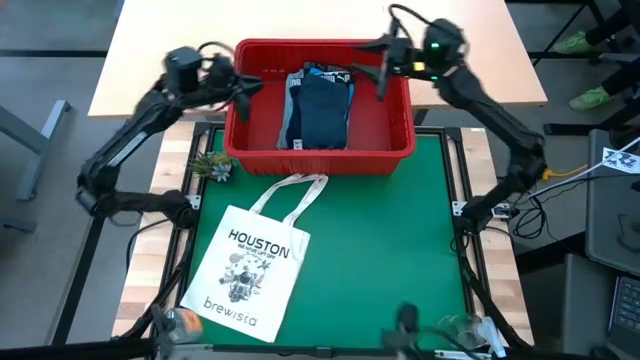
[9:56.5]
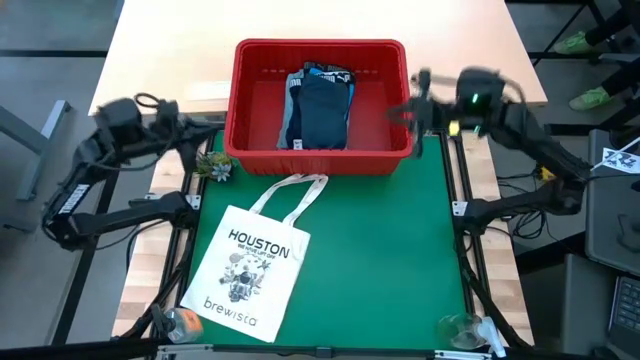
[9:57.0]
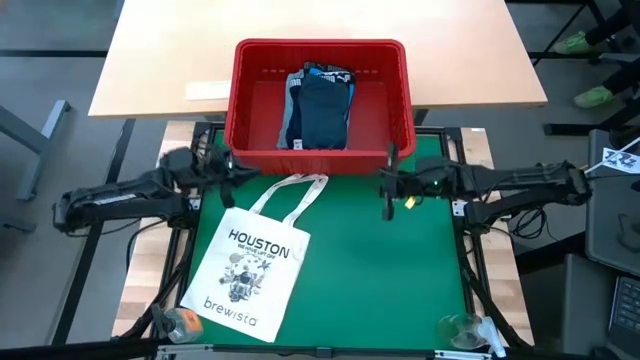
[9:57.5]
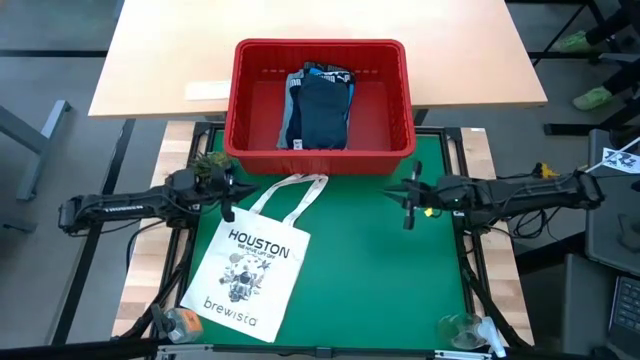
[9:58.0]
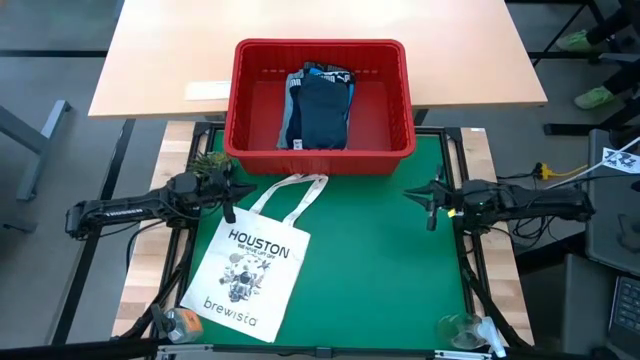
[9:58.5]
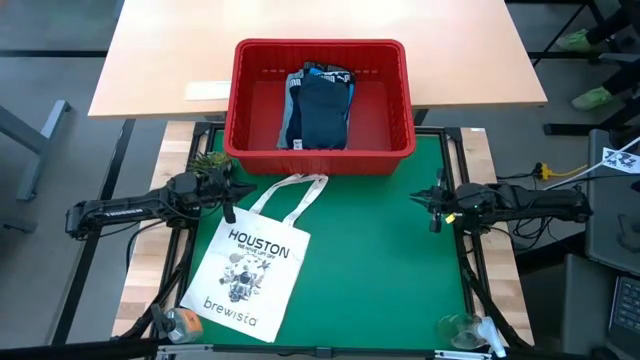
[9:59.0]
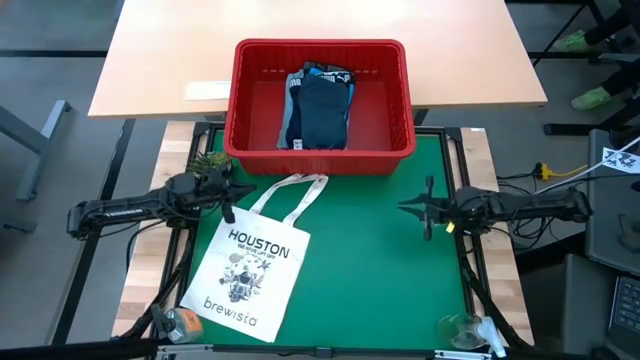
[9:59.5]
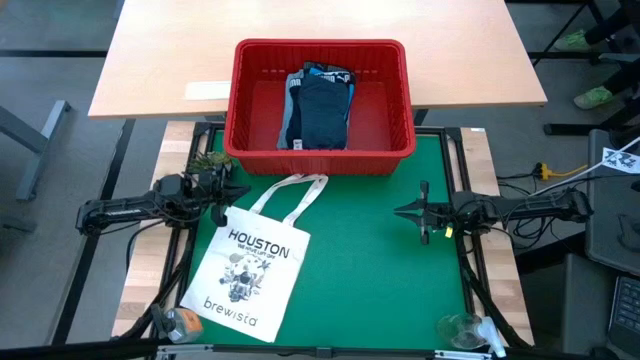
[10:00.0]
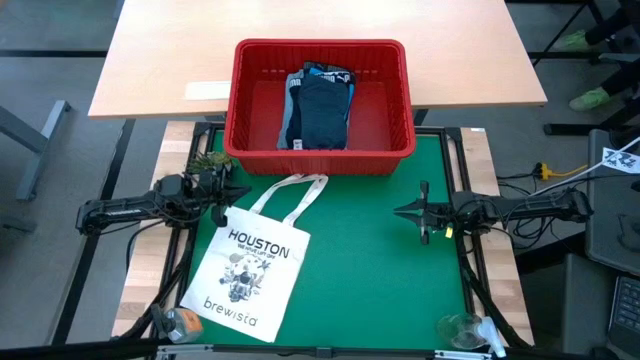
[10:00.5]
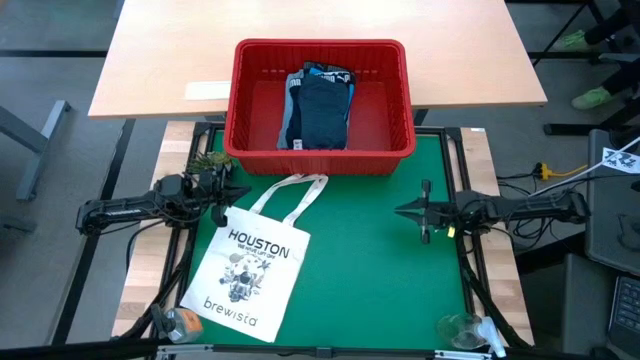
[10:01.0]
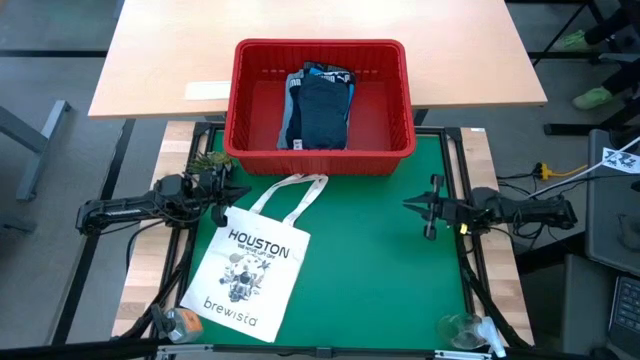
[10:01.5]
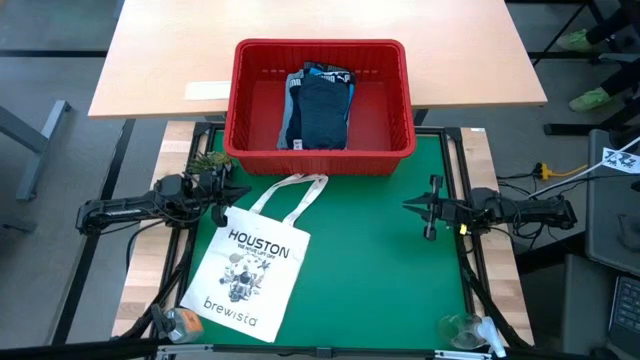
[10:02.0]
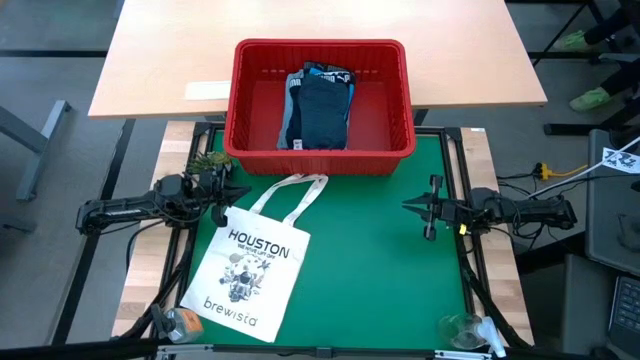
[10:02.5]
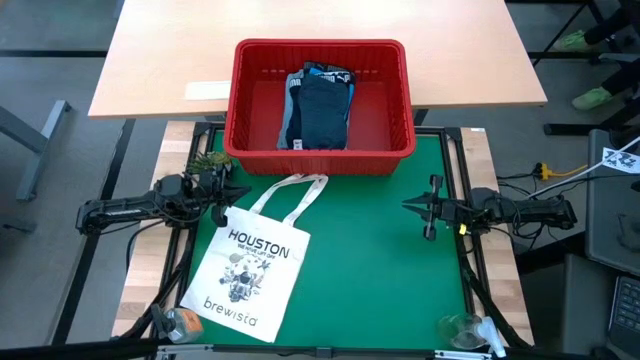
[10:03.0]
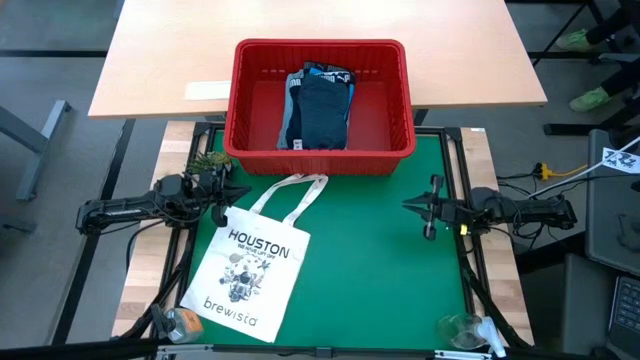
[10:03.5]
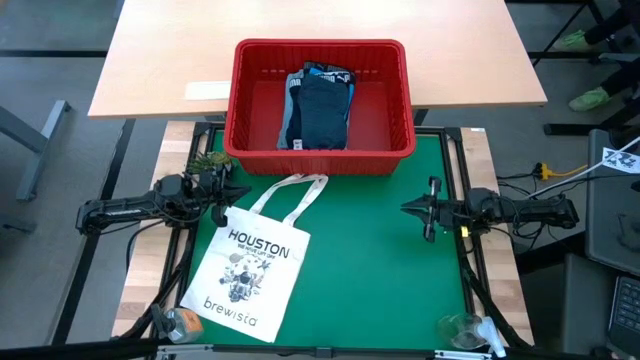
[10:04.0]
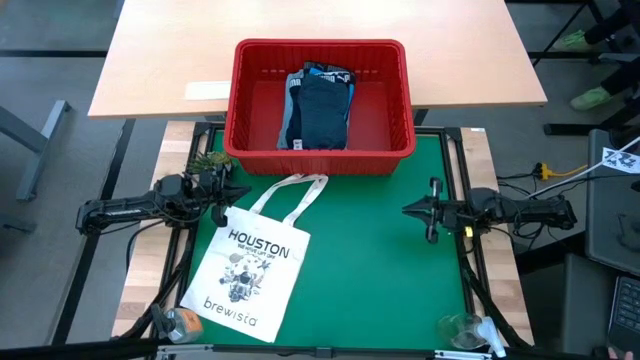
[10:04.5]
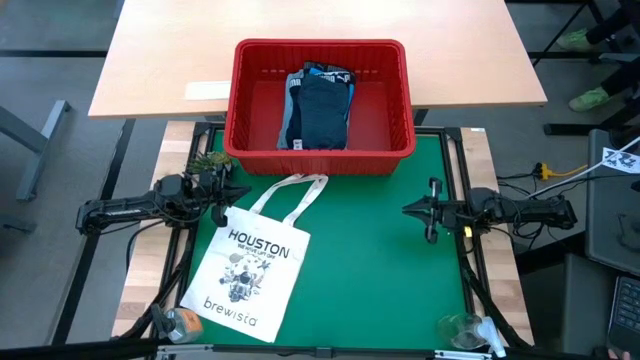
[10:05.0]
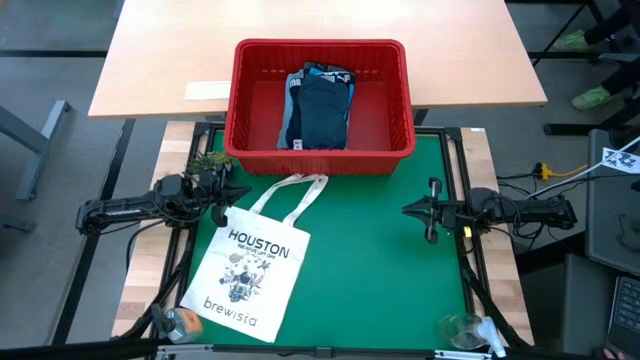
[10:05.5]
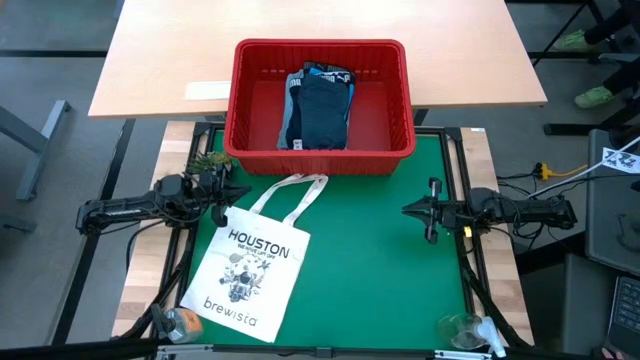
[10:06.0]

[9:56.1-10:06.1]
Task: Fold Laundry from Bin
Return to Home Position

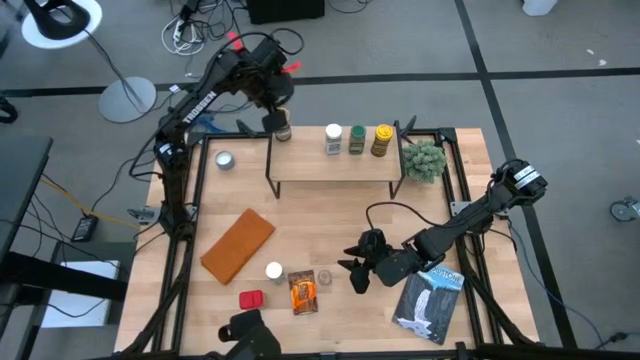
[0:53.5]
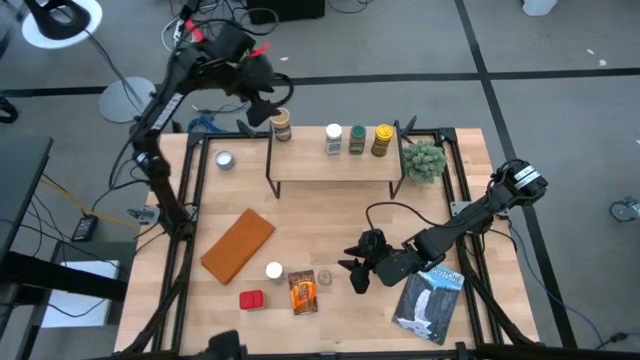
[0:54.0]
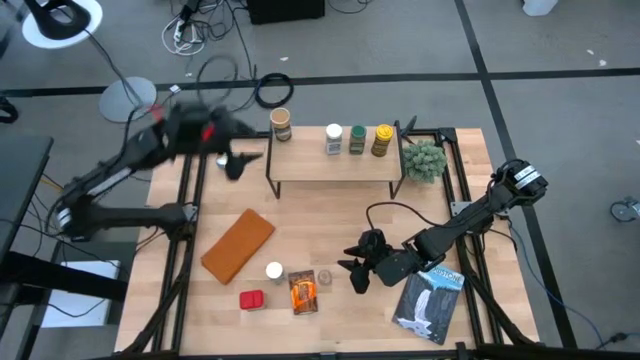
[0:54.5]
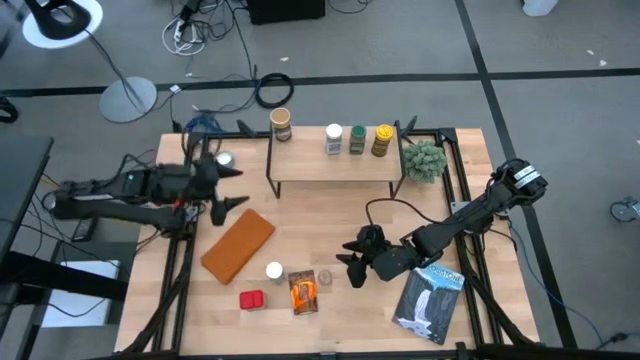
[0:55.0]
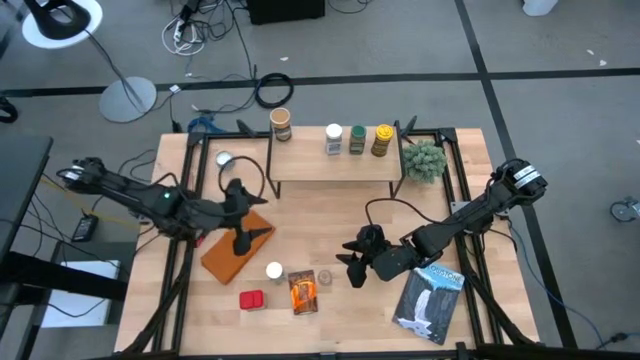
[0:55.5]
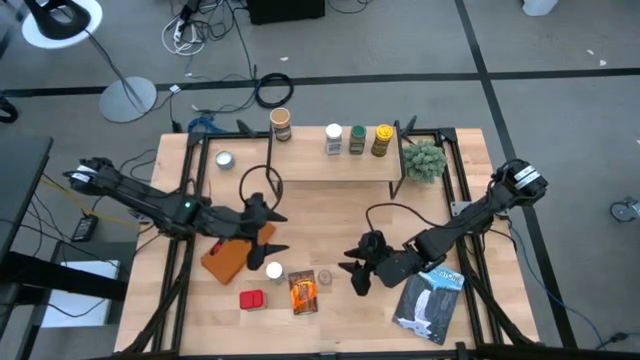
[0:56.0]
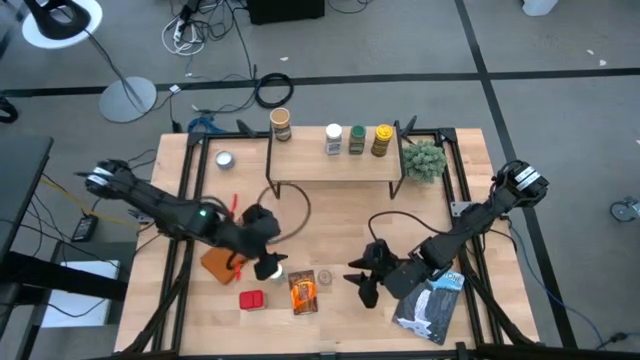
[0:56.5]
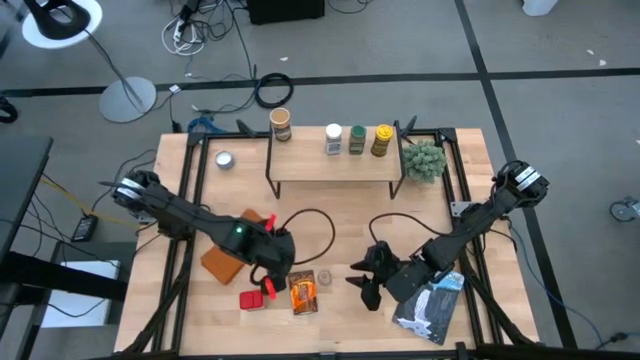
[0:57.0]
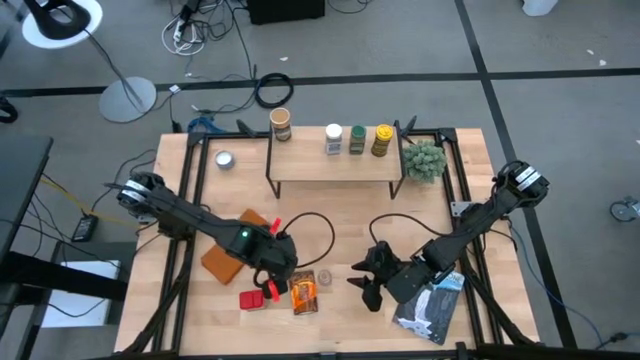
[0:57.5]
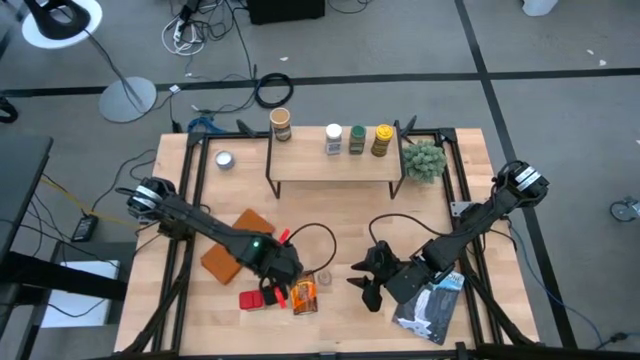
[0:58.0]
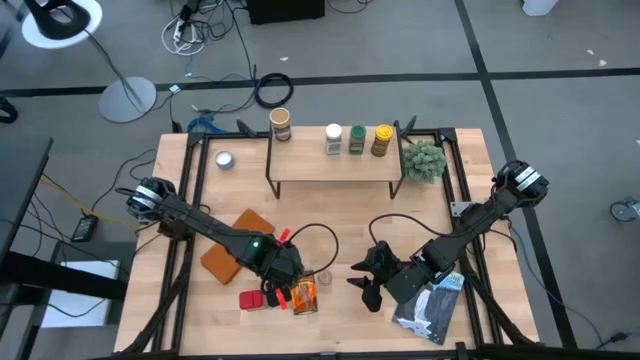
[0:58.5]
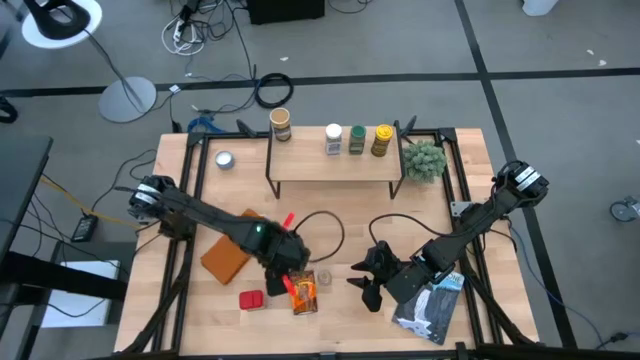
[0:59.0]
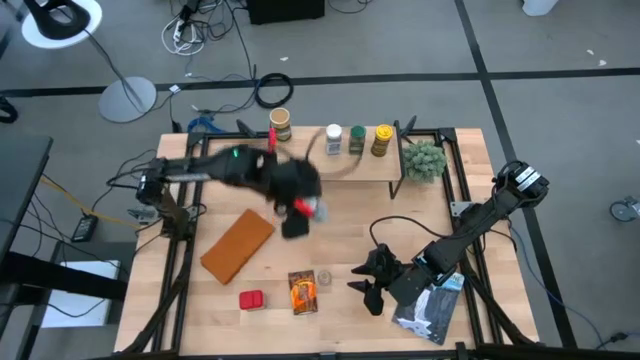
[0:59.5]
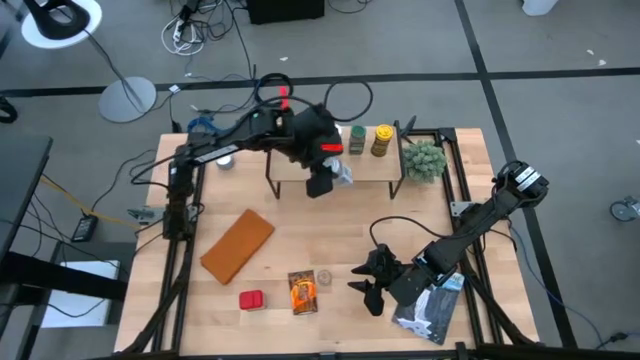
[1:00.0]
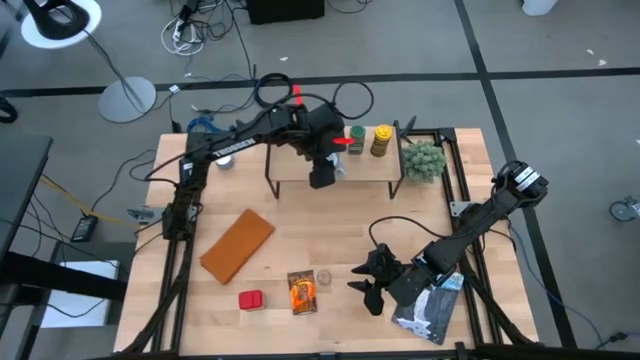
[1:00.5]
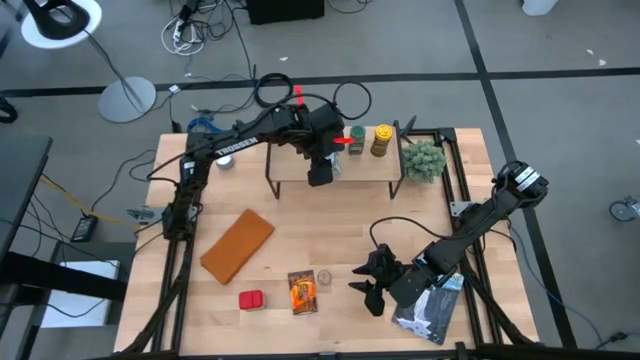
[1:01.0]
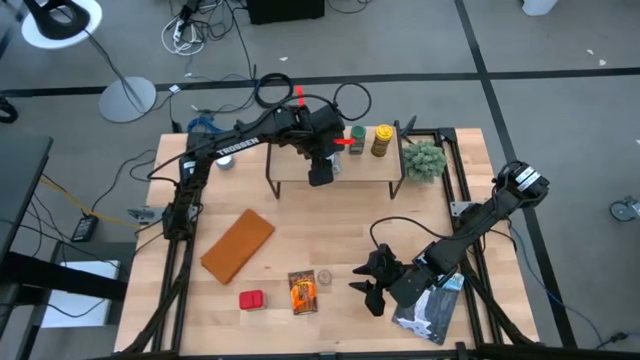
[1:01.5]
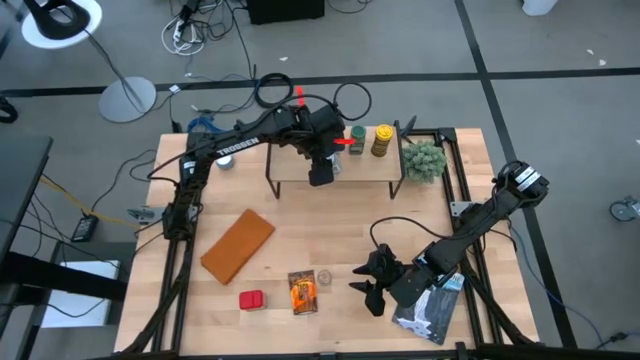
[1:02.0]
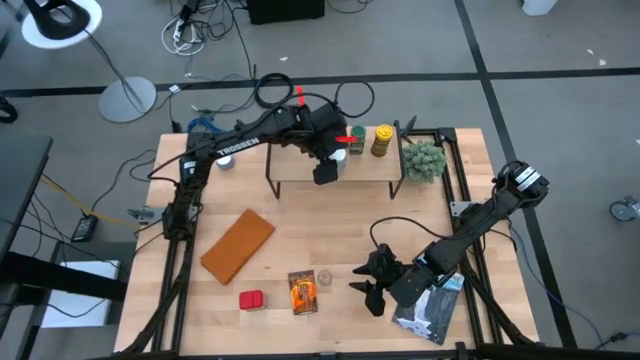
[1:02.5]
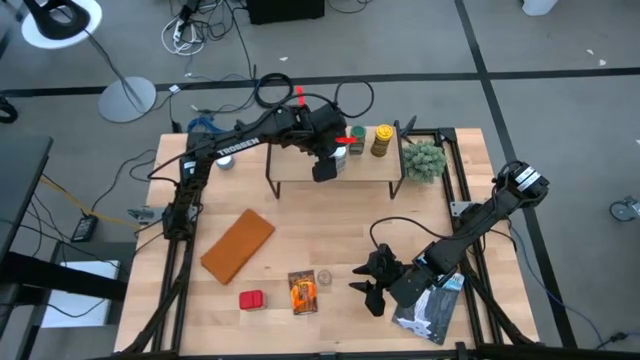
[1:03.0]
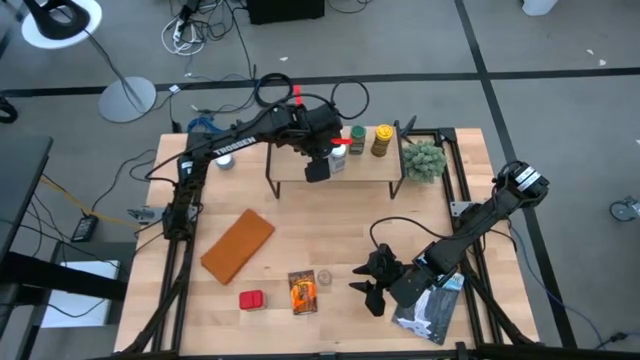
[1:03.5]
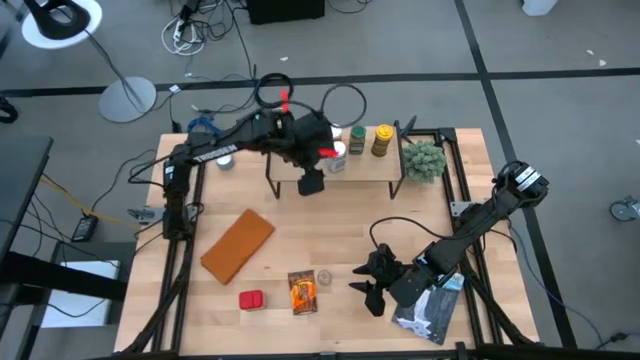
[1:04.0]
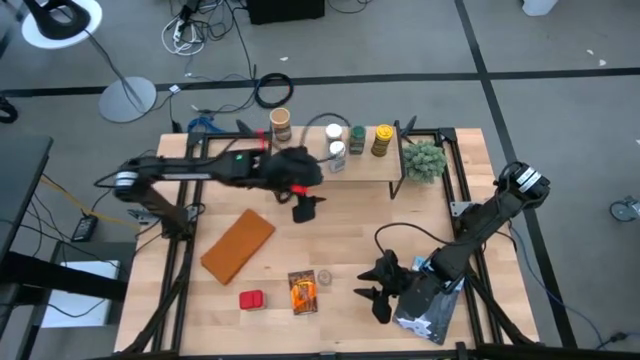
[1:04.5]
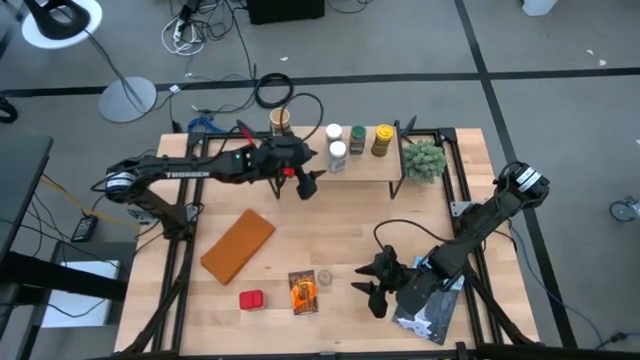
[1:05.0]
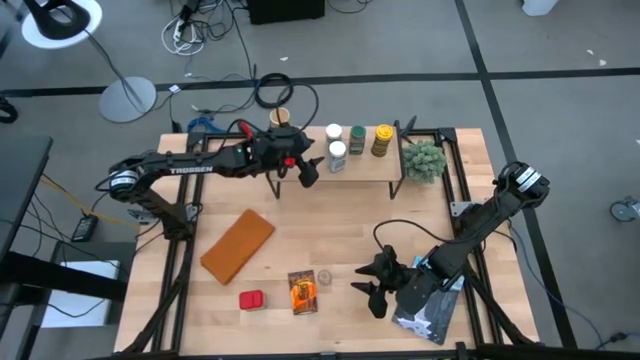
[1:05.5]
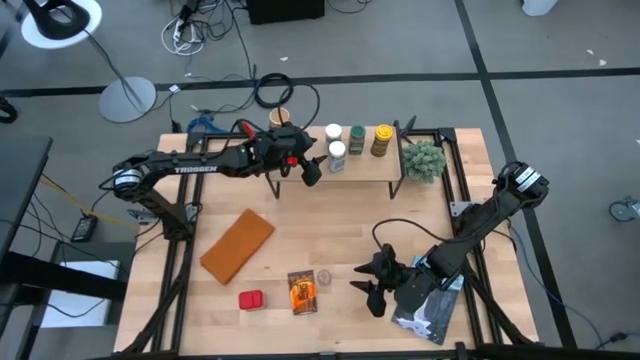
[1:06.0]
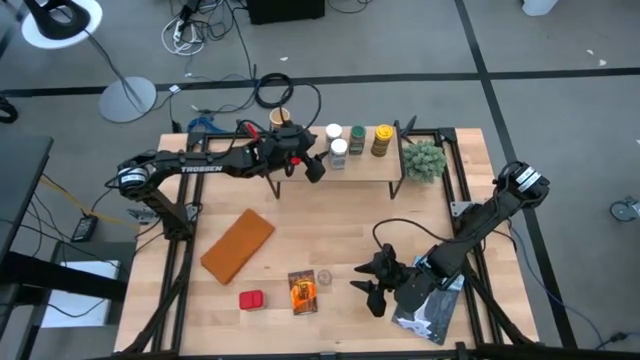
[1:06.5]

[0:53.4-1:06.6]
Task: Shelf spices
Put the white seasoning bottle on the shelf
